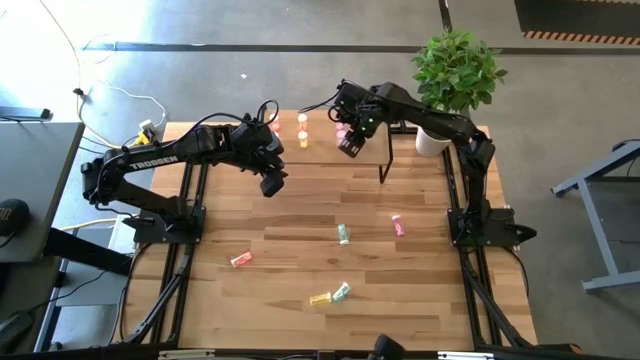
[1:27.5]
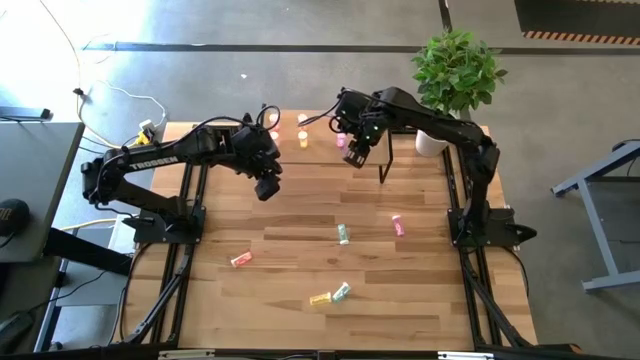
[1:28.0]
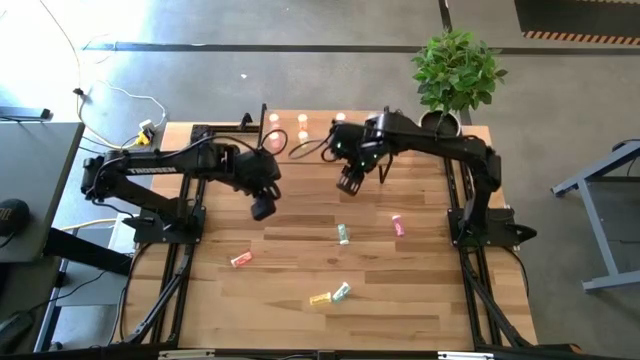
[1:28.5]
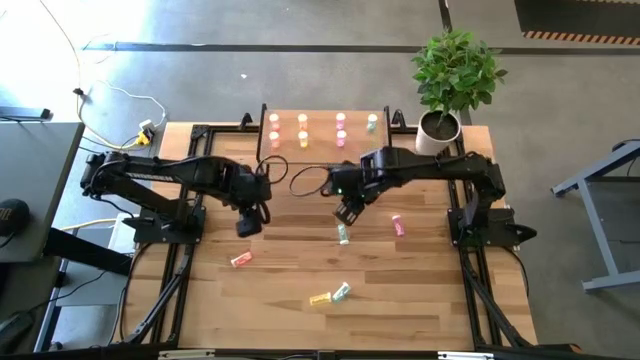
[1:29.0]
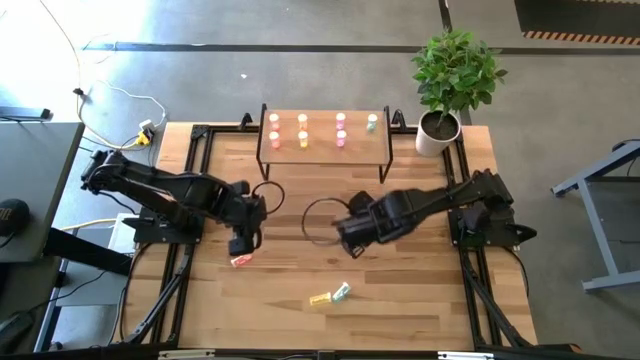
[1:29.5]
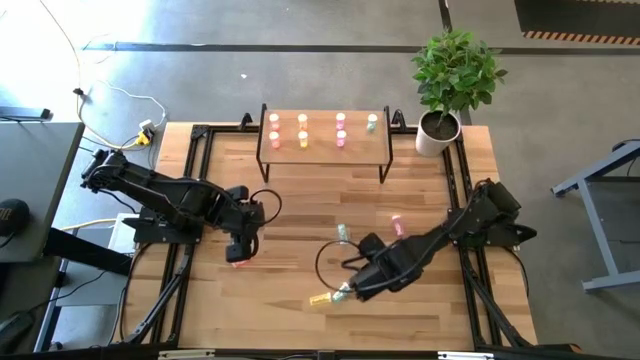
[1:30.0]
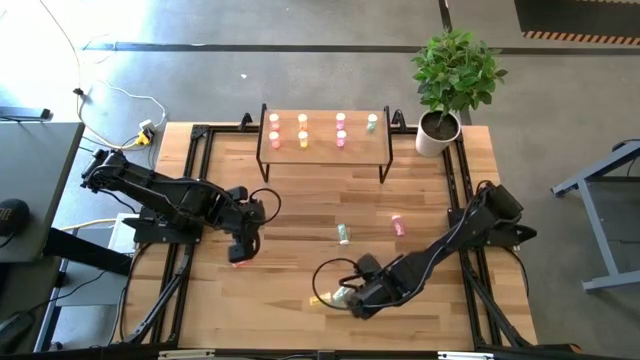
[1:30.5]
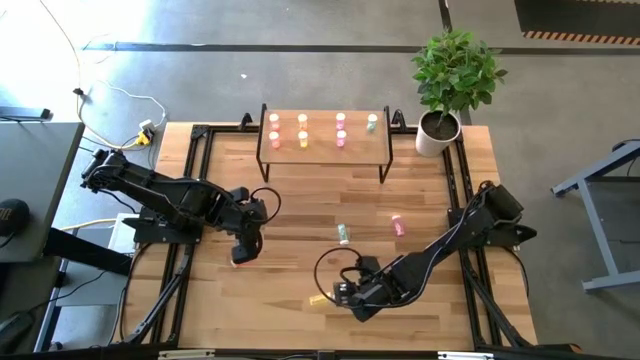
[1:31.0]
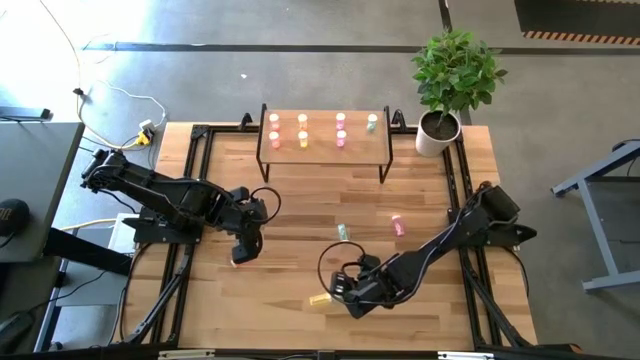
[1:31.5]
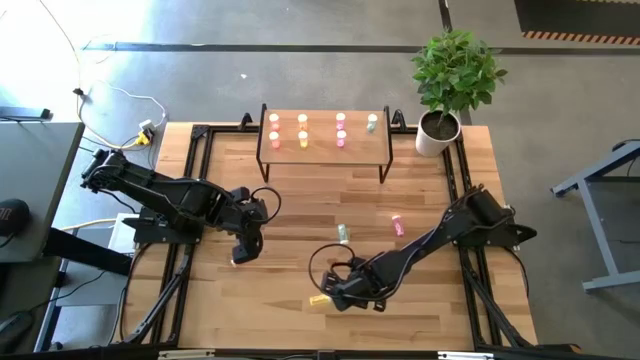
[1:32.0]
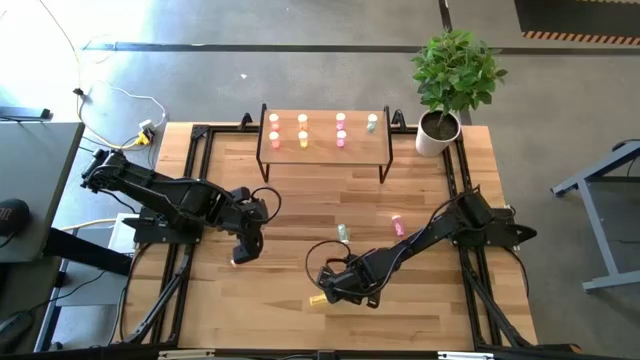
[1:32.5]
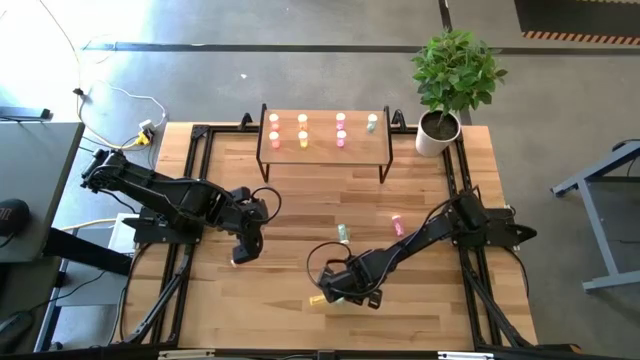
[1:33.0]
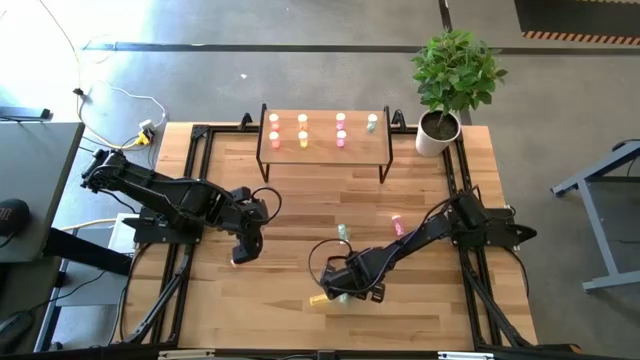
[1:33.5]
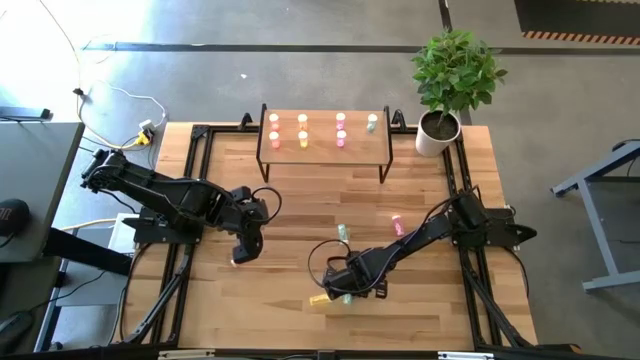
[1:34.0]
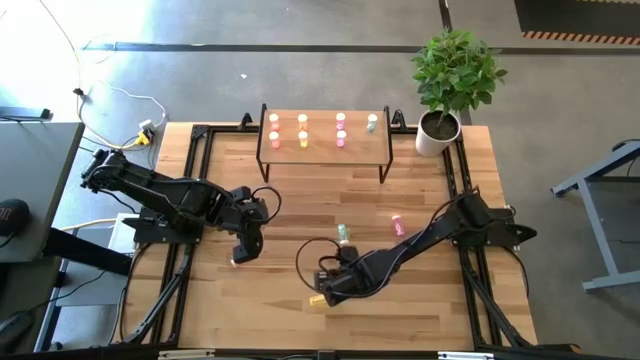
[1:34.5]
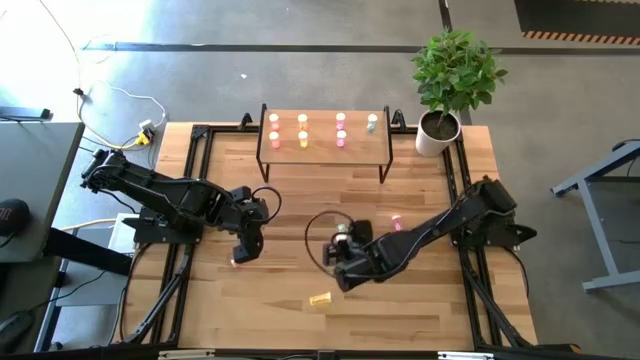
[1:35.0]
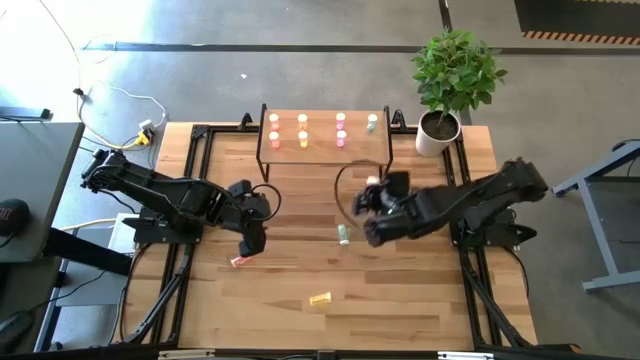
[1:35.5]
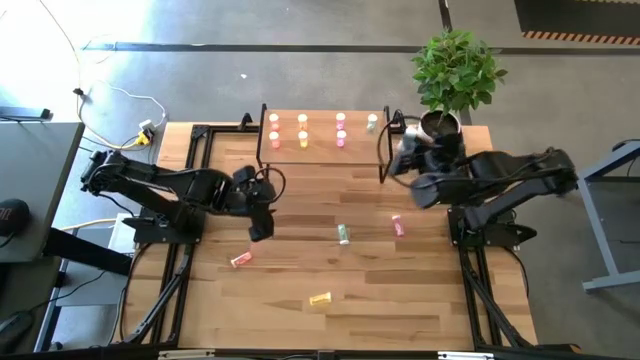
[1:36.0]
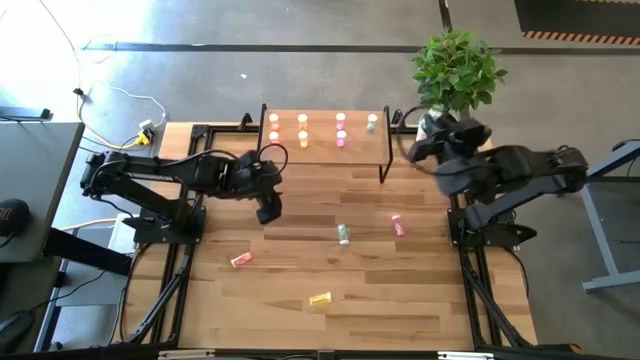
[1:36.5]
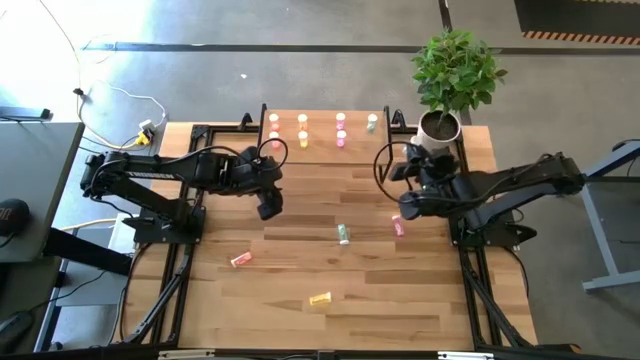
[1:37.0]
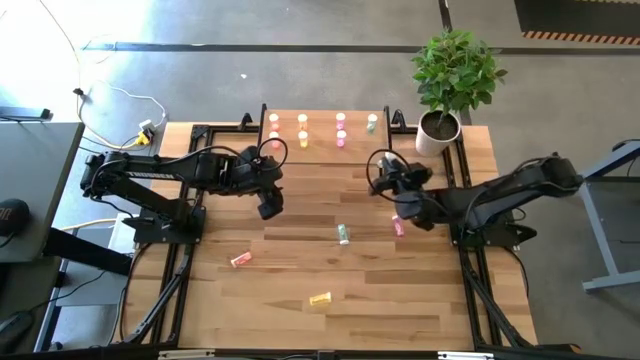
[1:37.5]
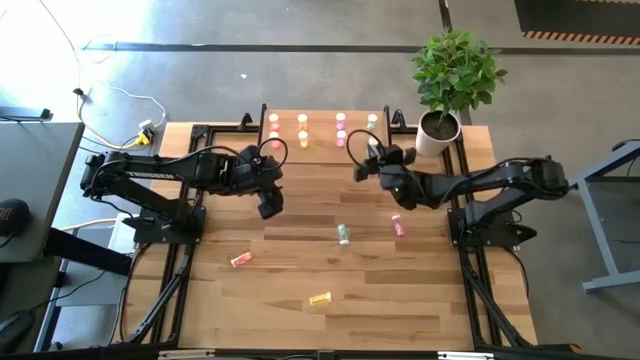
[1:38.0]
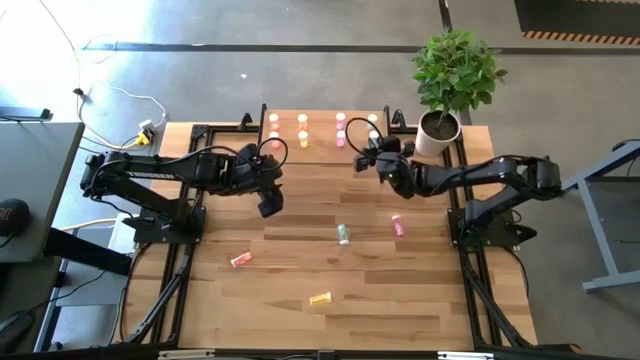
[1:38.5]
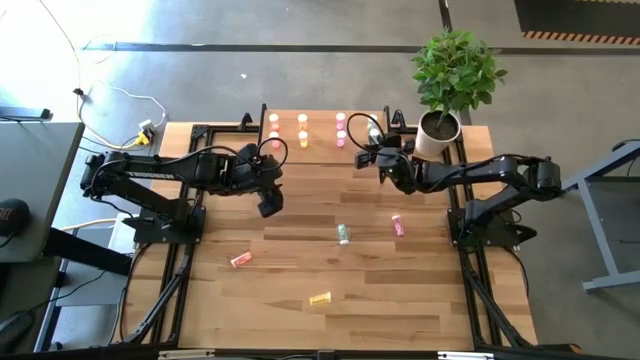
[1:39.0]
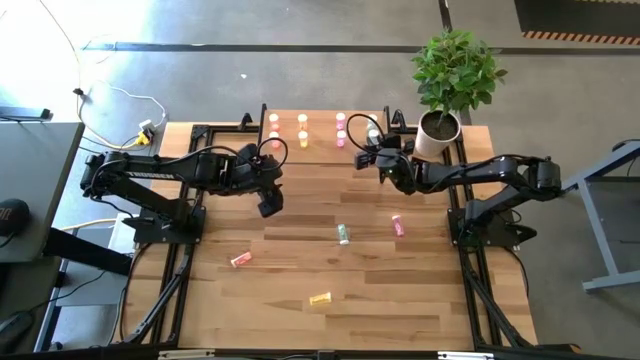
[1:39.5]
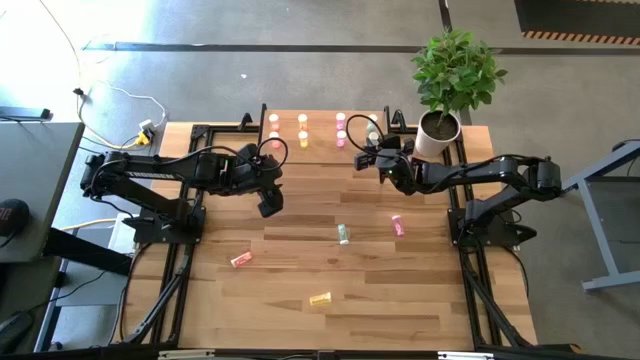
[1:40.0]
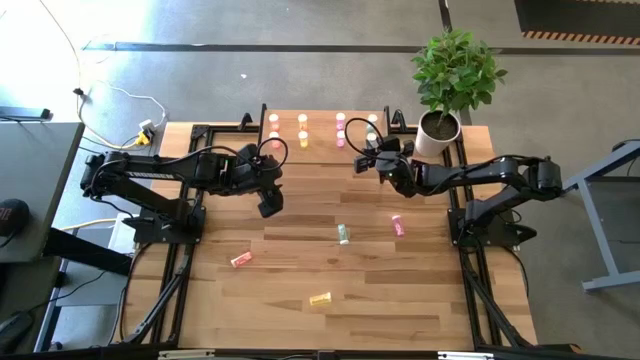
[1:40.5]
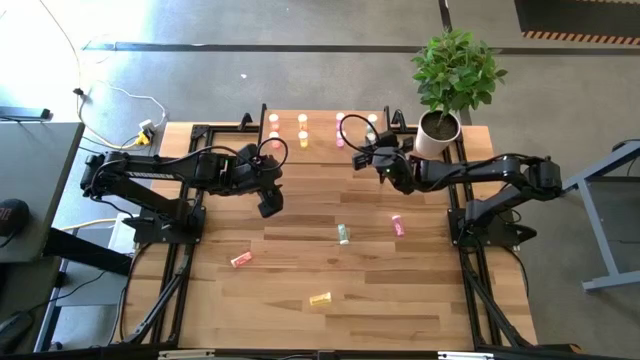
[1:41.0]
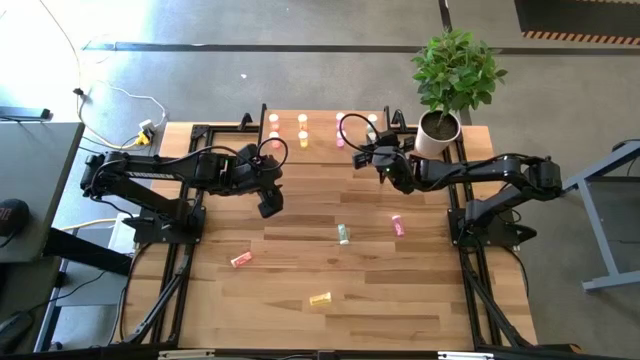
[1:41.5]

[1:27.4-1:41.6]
Task: Pick and place medicine bottles onto shelf by color
Put the bottom blue pill bottle on the shelf aligned with the other blue pill bottle

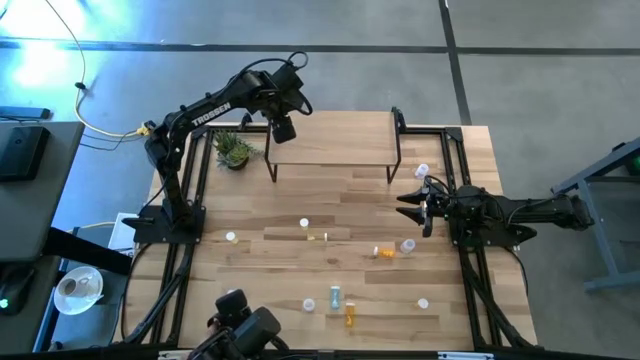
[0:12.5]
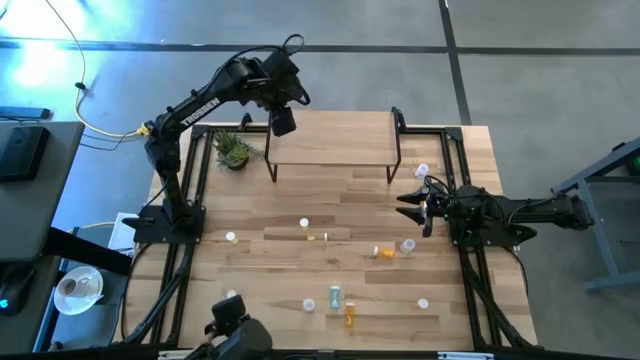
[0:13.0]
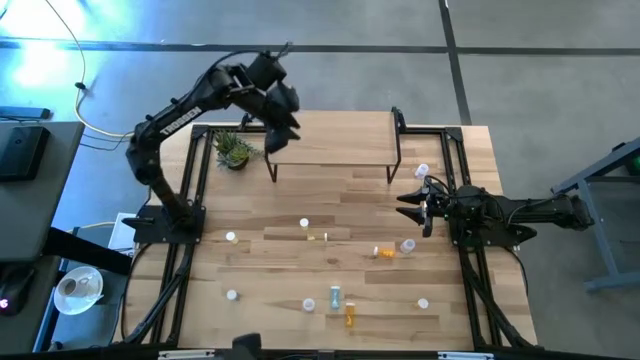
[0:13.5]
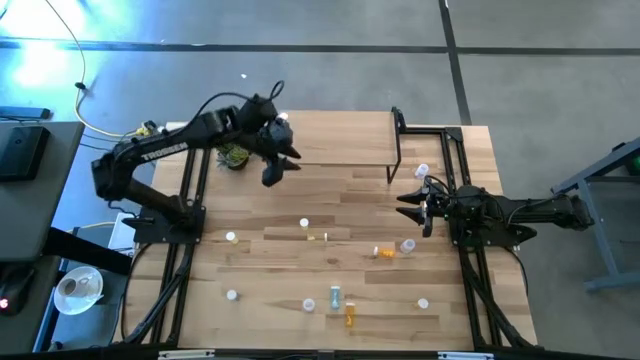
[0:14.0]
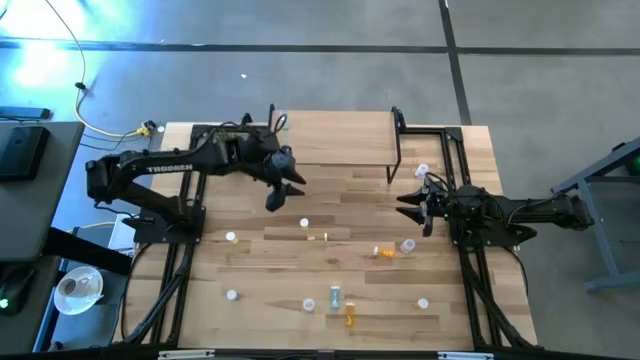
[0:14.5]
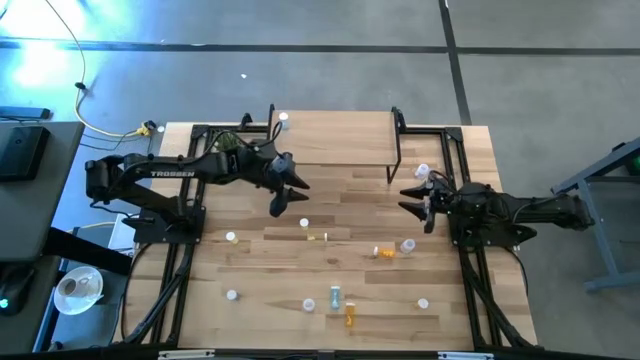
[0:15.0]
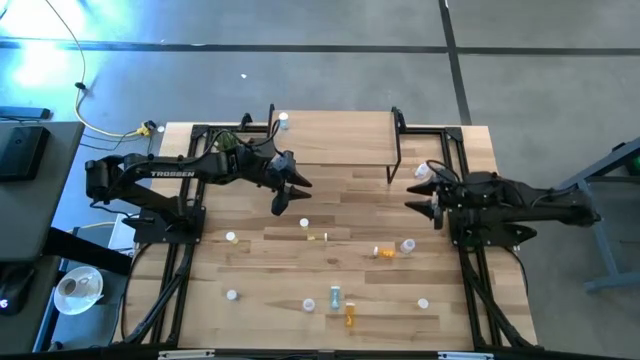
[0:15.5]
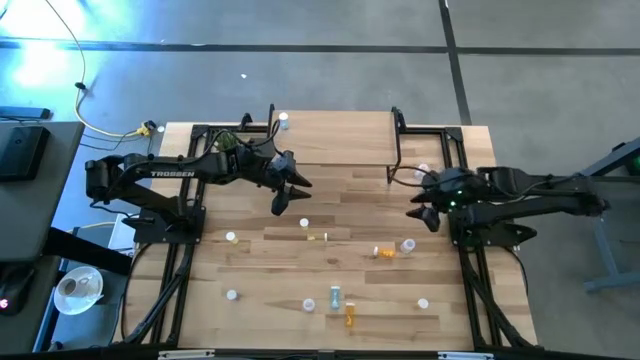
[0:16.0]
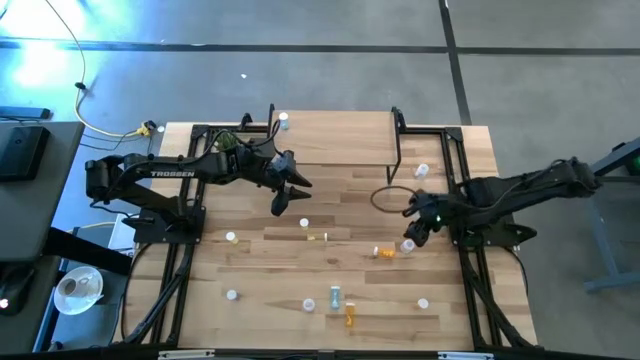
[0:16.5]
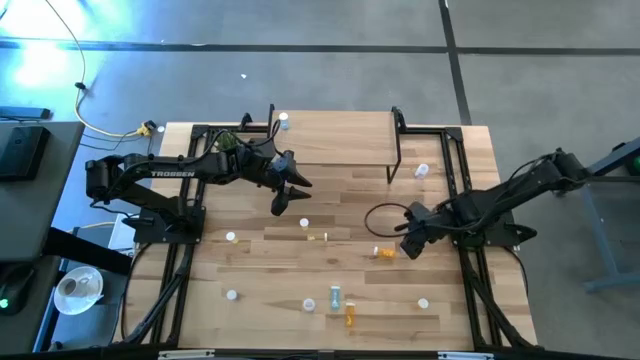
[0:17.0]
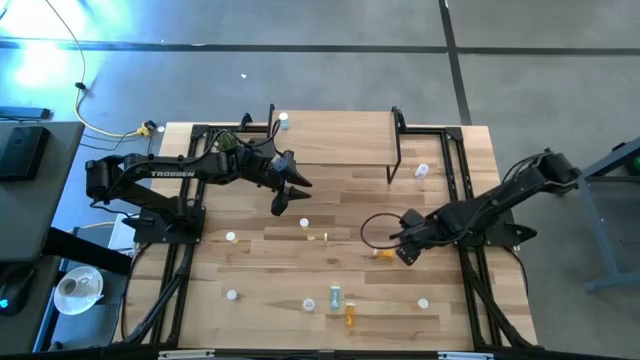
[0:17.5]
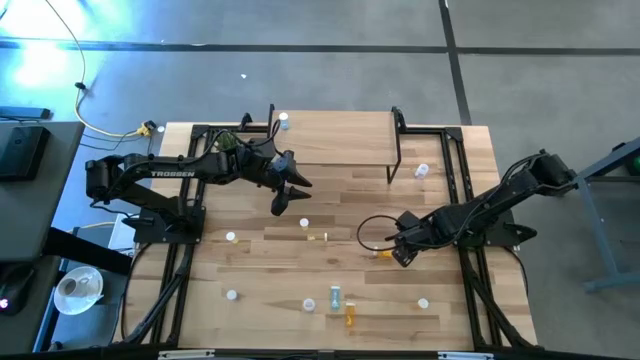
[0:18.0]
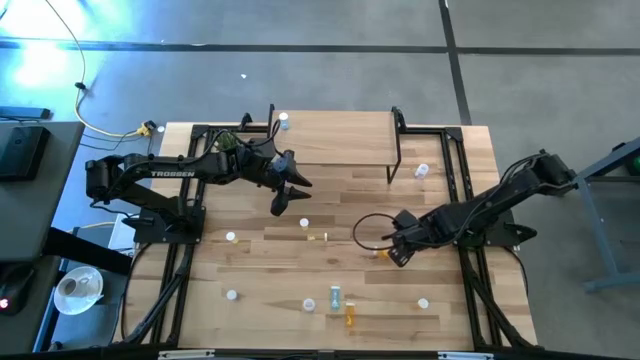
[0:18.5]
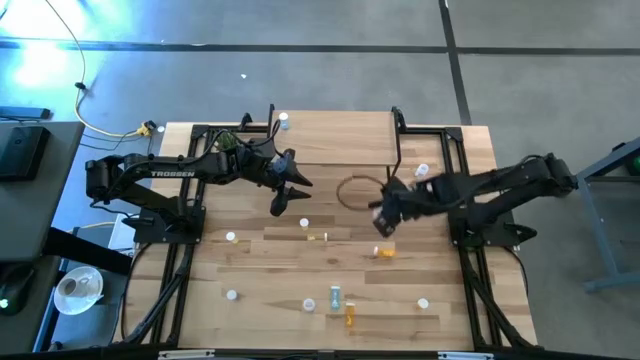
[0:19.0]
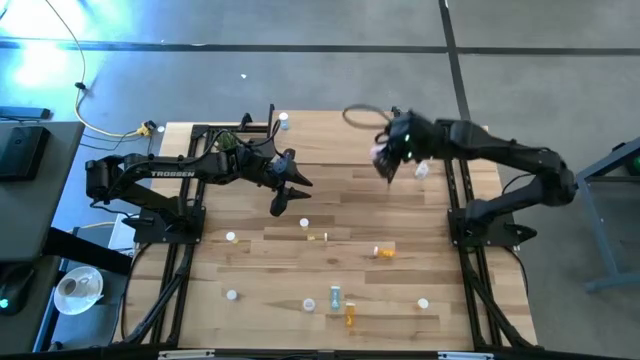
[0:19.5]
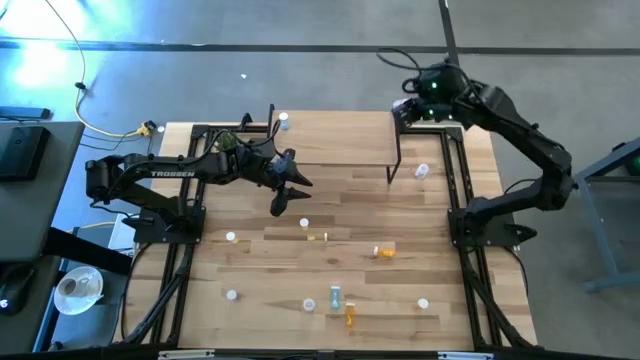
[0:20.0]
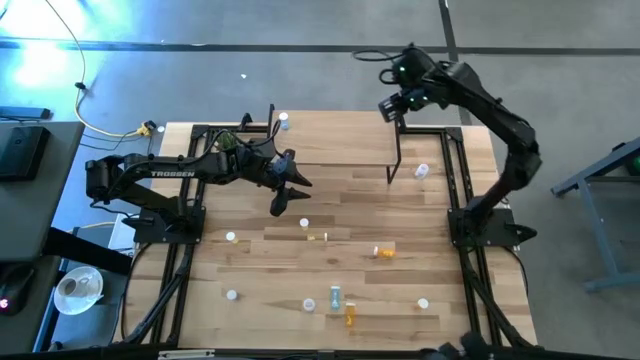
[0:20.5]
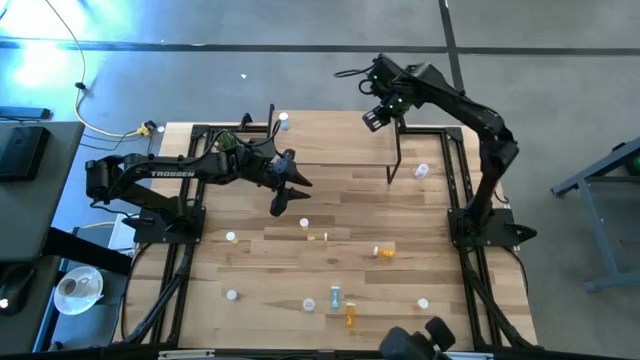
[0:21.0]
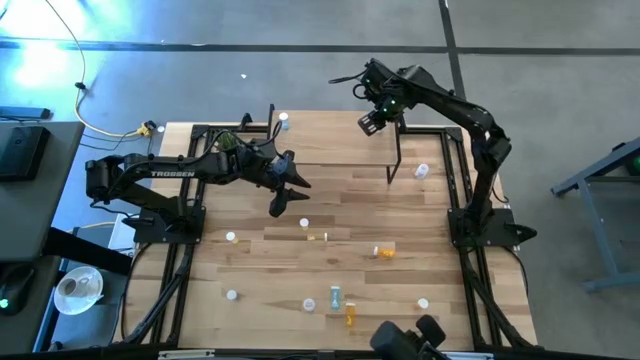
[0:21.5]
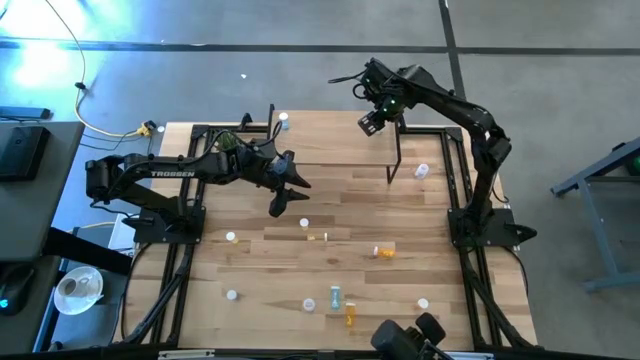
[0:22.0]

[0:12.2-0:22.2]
Task: Pick and place medicine bottles onto shelf by color
Put the middle transparent pill bottle on the shelf
